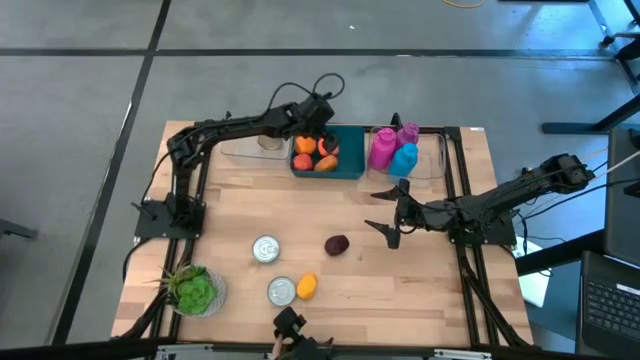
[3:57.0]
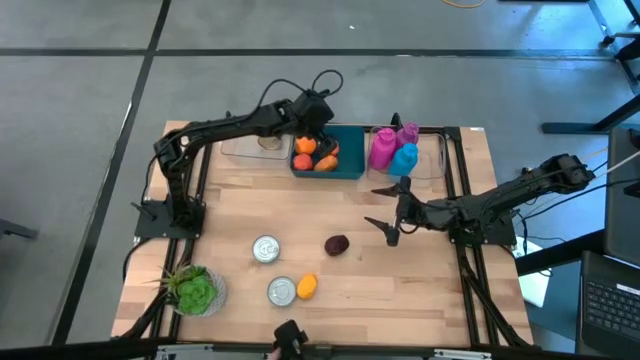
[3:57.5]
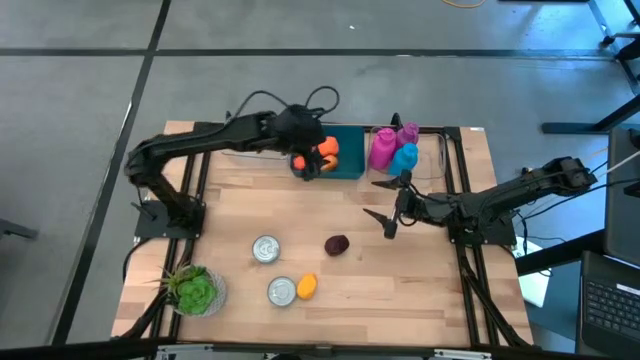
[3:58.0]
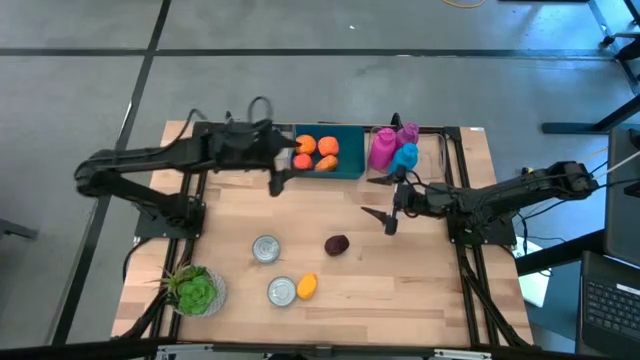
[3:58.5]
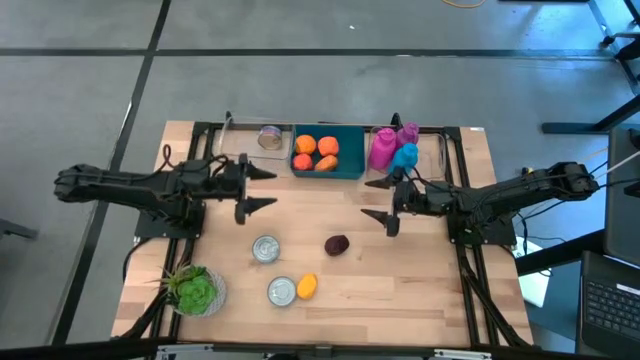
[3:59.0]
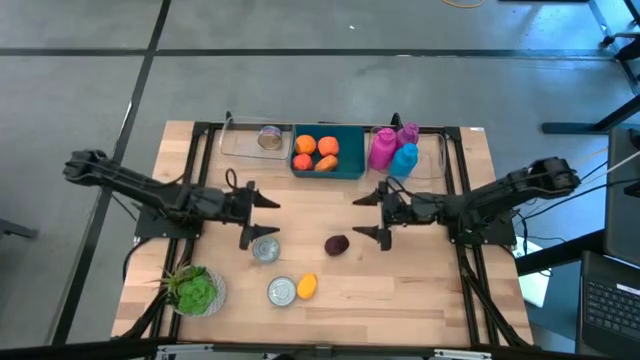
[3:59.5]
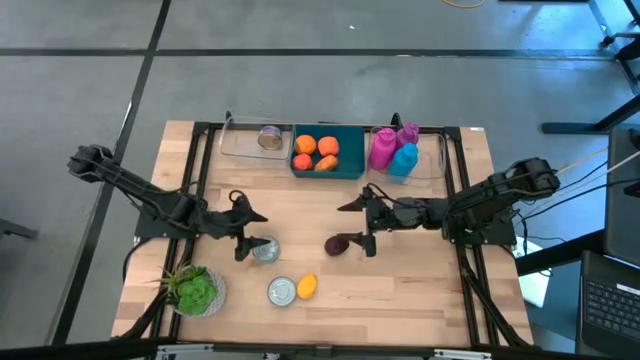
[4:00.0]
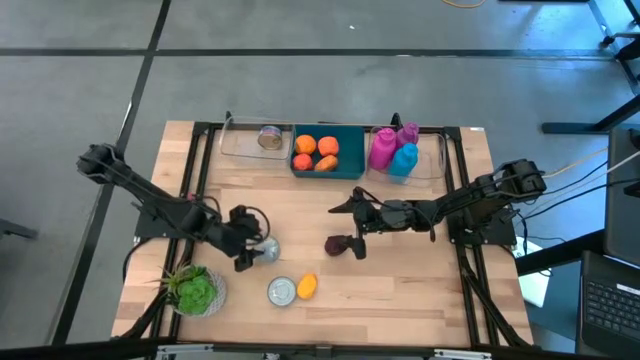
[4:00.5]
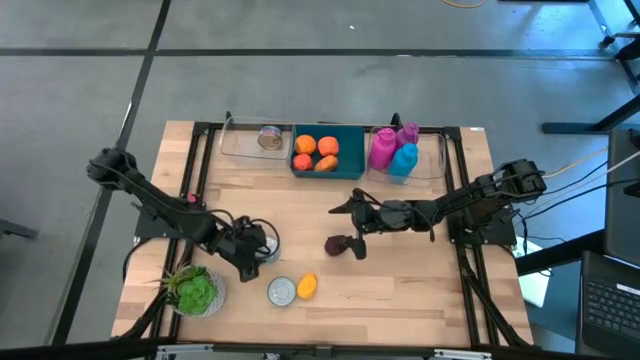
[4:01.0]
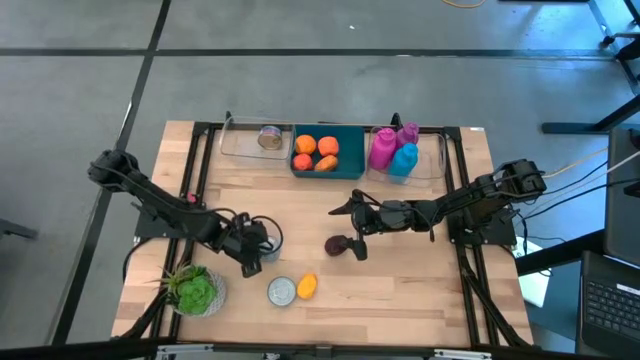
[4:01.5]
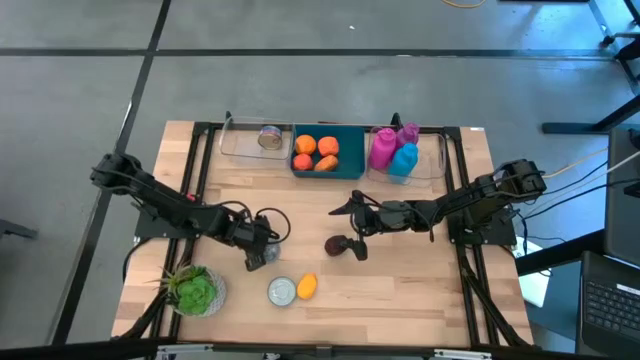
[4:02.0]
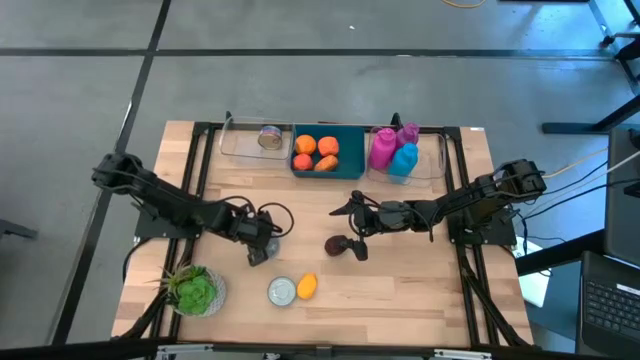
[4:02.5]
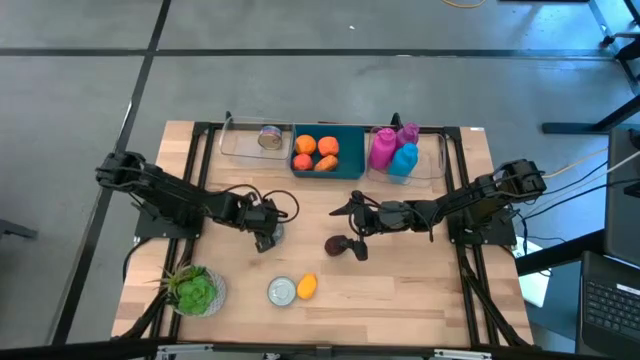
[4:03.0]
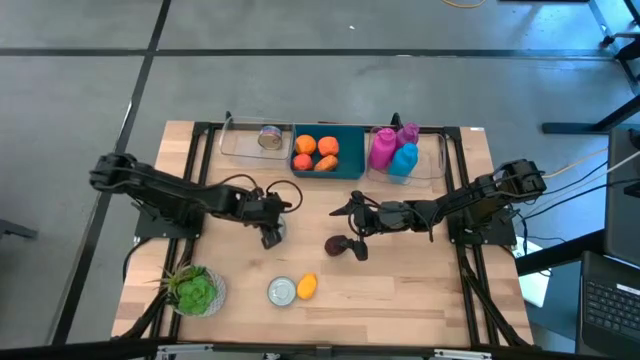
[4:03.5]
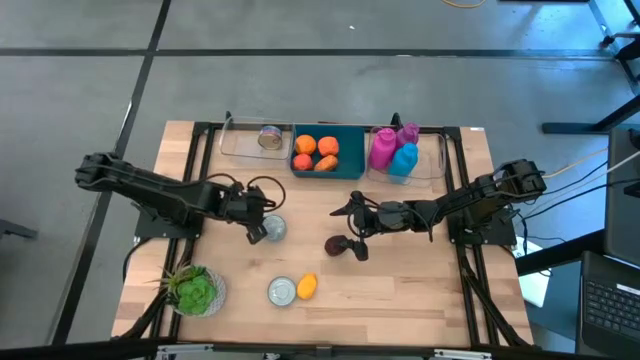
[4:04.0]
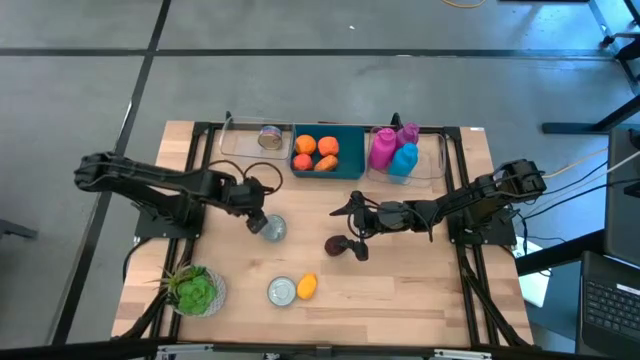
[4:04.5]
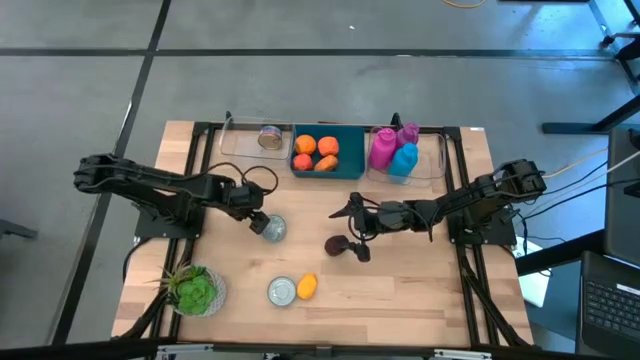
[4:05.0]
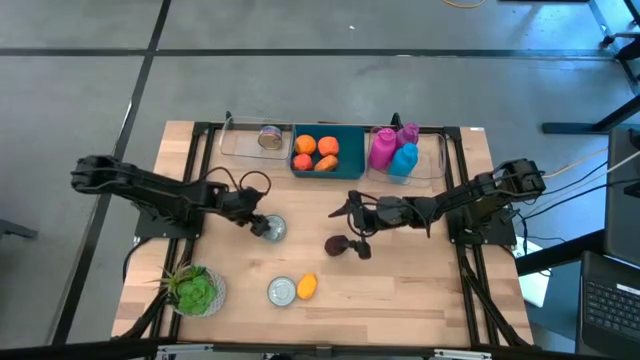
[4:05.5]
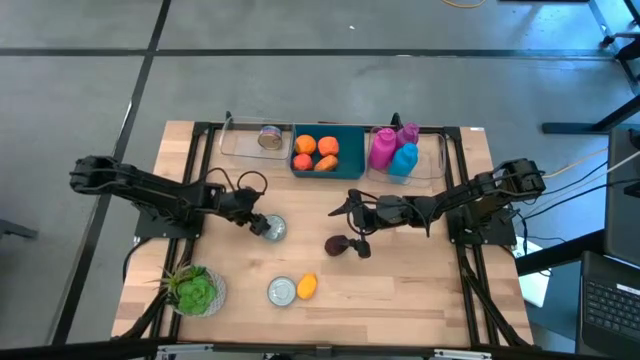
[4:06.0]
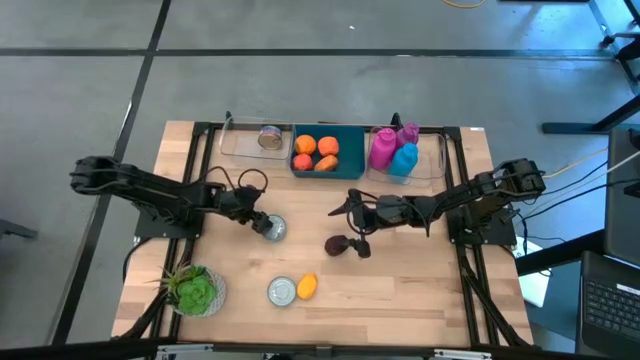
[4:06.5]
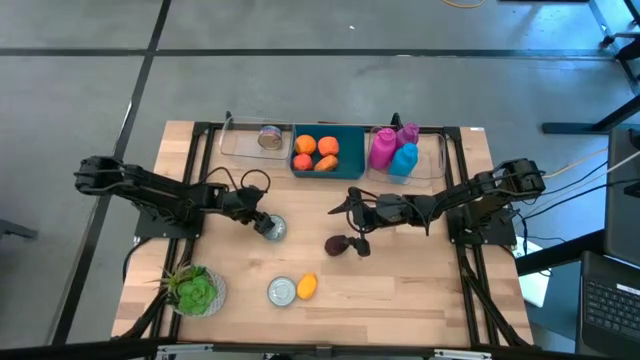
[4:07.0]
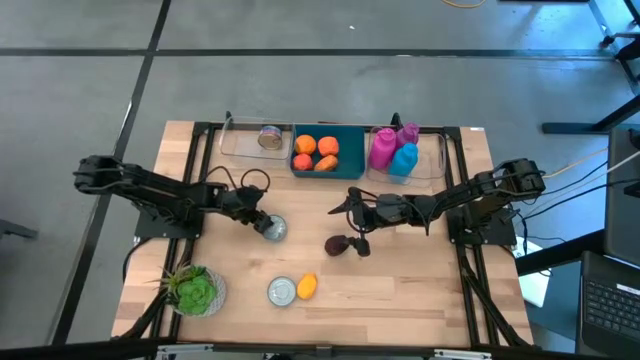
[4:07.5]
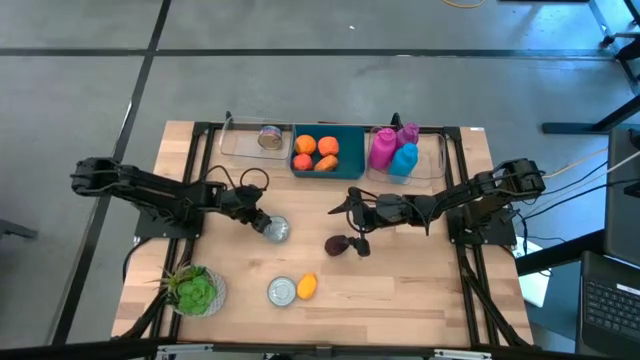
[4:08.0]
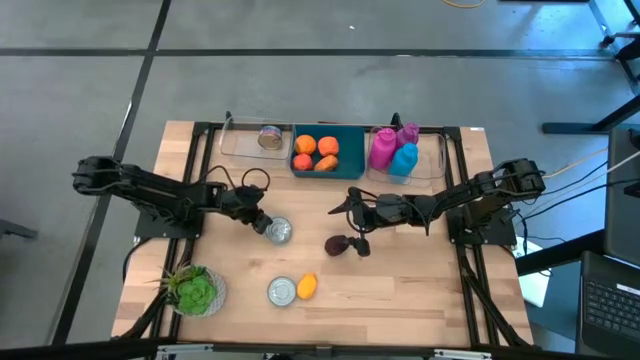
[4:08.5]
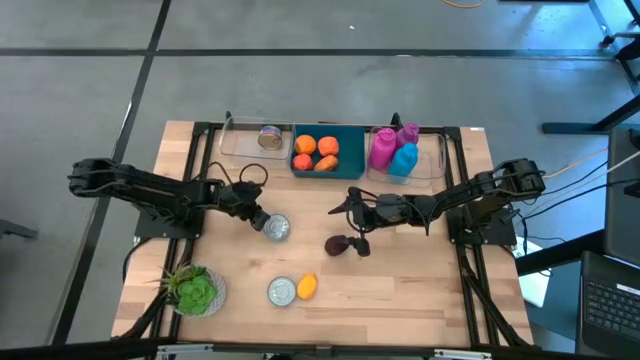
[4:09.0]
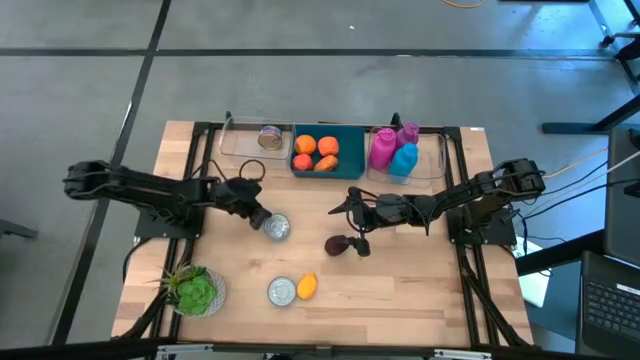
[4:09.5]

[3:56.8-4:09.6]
Task: Pick & Place Food Item
Put the top yellow blue tuna can into the left transparent bin

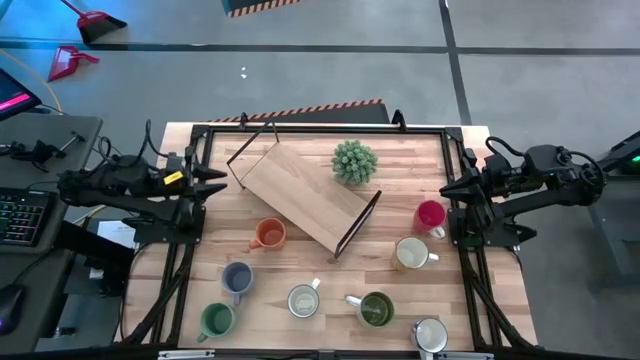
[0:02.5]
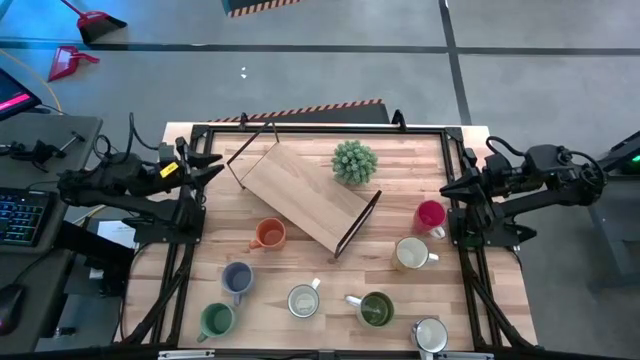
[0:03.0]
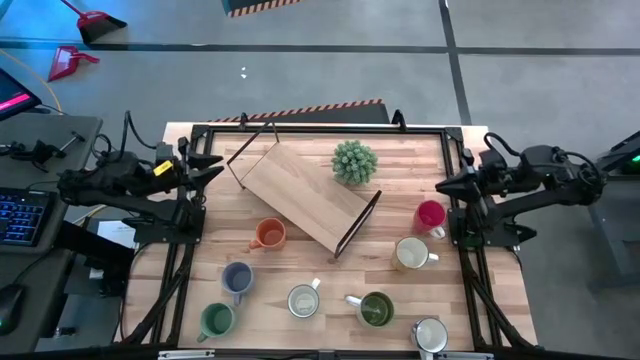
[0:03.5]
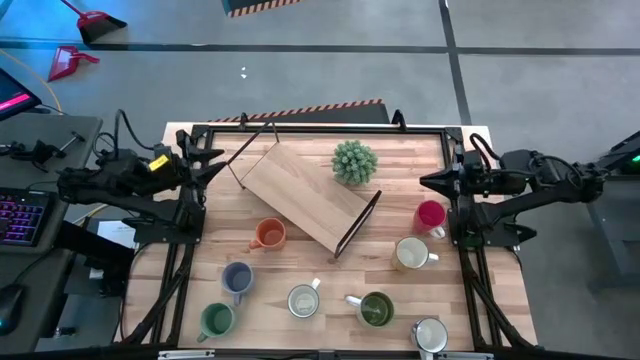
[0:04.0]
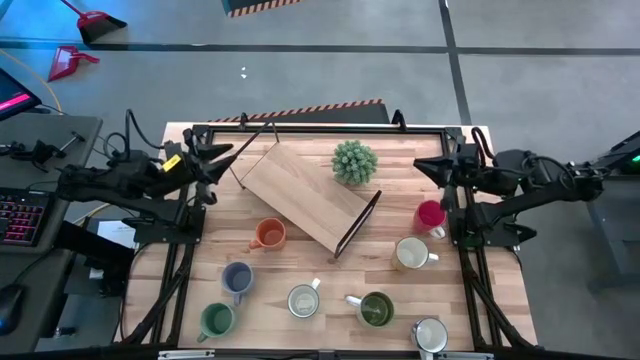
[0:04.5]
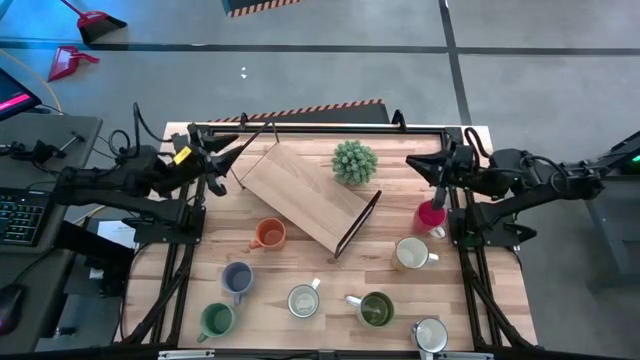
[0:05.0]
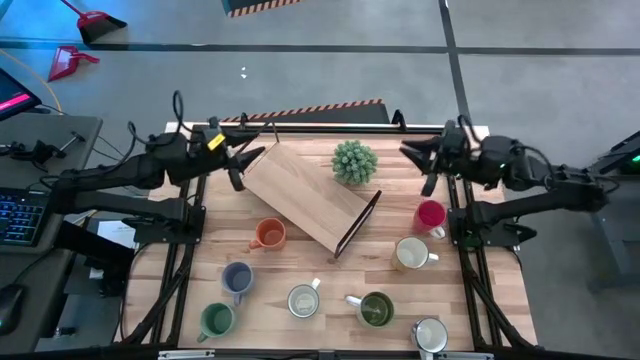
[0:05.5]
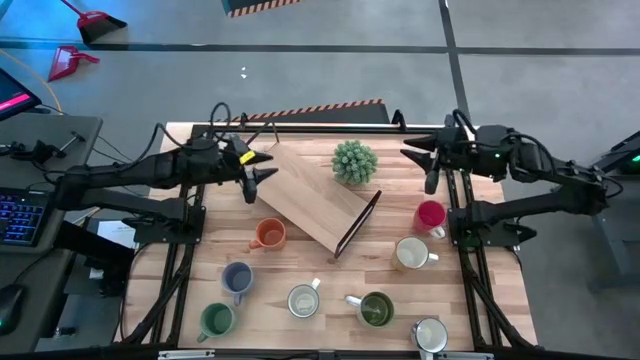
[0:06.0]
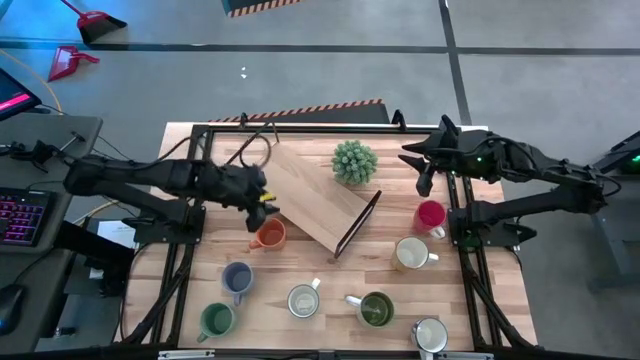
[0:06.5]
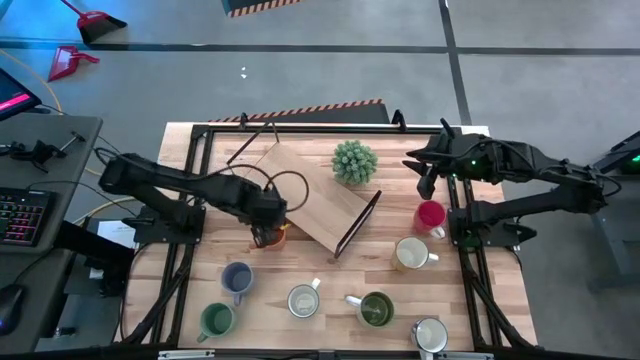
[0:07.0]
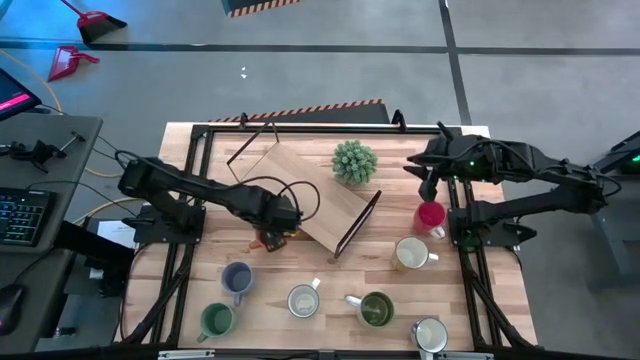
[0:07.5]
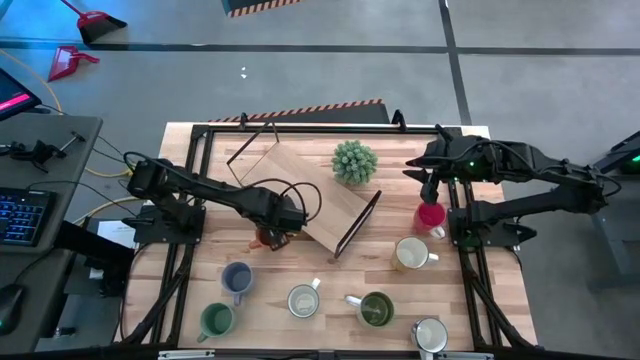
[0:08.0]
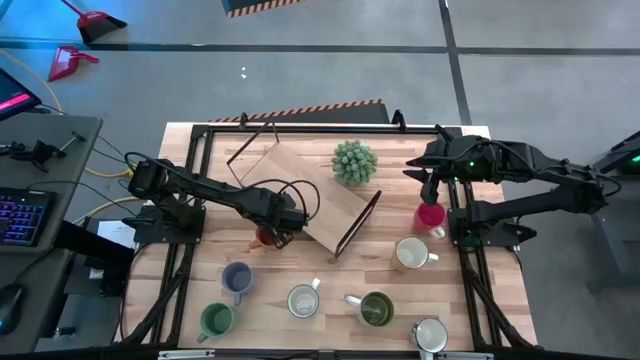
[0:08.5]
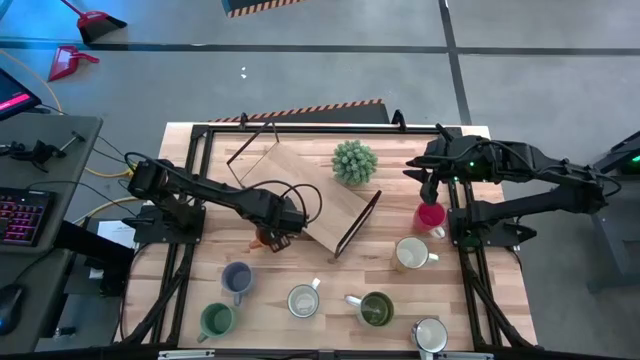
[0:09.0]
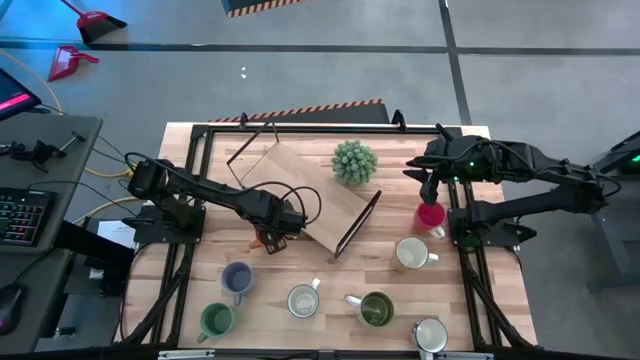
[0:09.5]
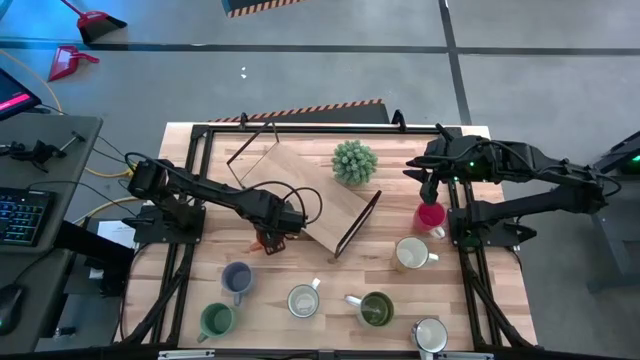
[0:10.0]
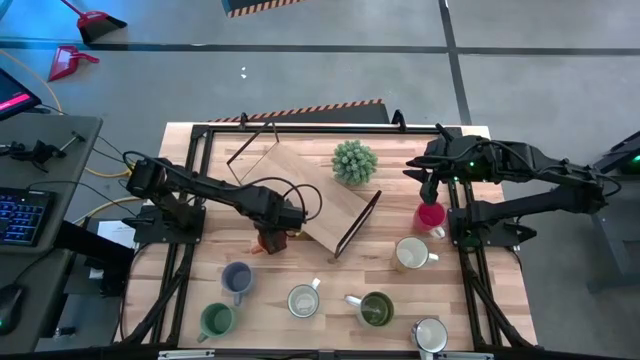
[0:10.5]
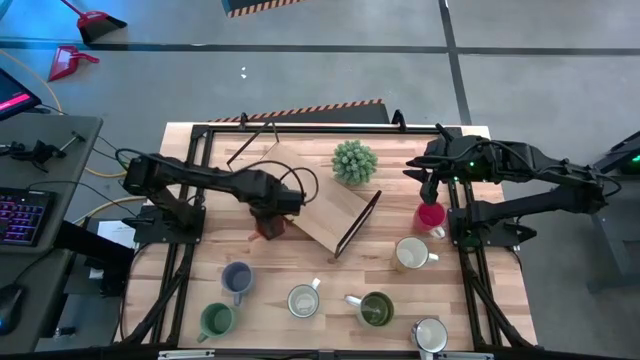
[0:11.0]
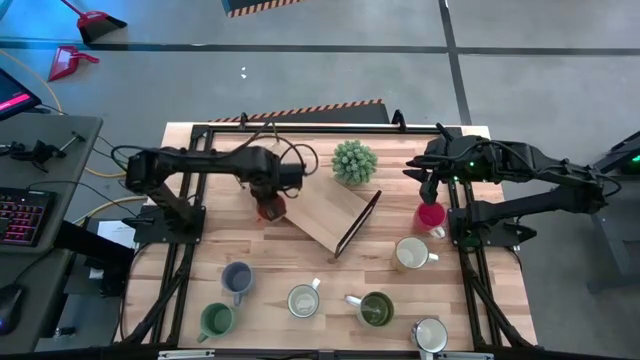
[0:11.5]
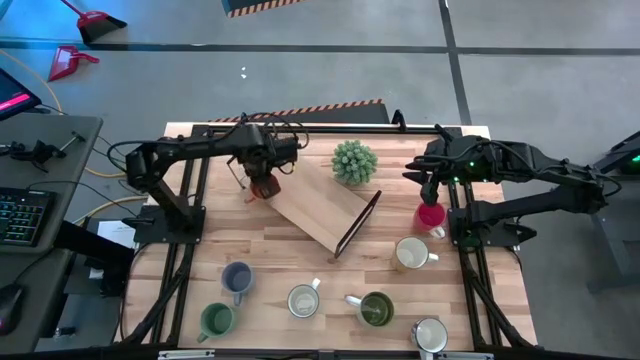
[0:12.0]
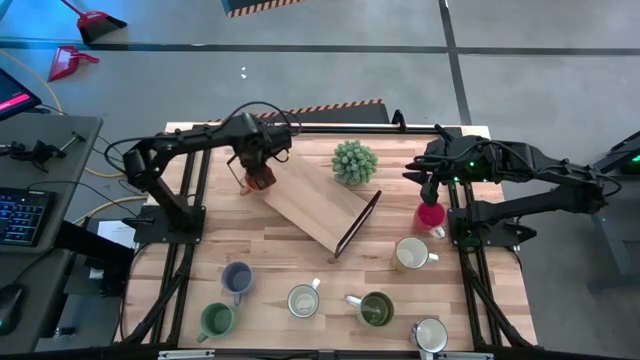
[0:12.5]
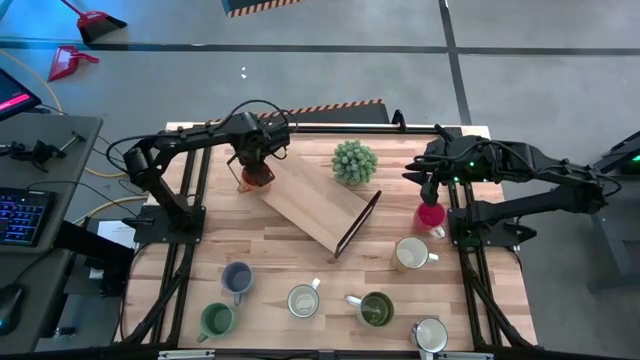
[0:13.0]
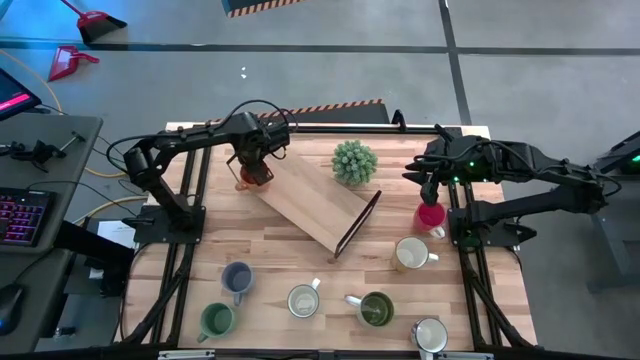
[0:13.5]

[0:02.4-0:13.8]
Task: Place coffee mugs
Put the orange mug on the shelf
